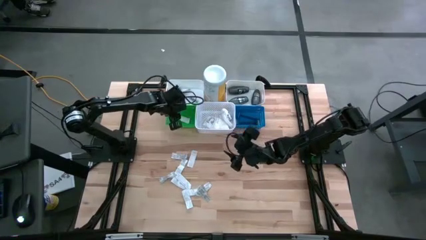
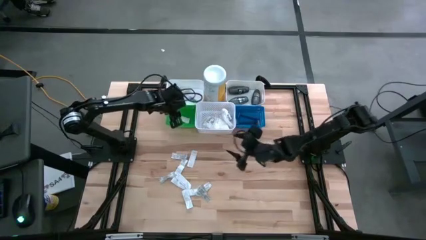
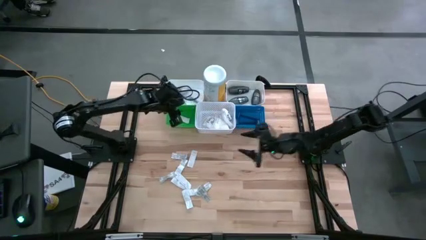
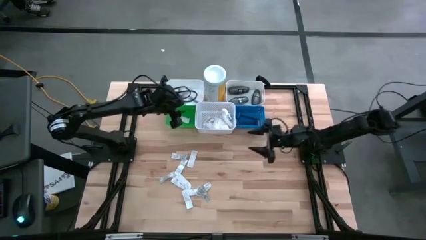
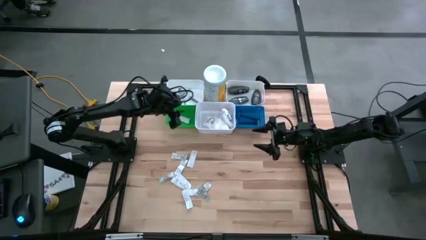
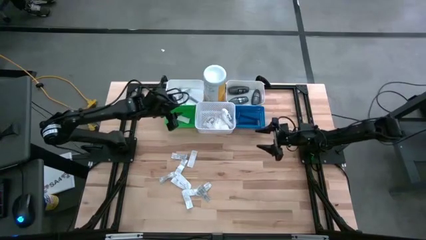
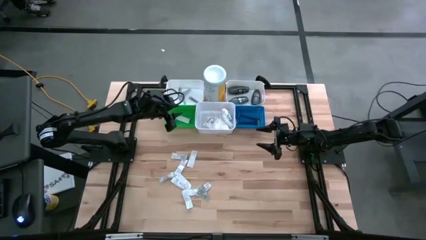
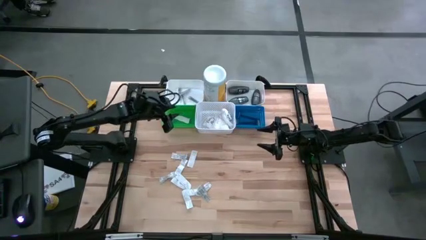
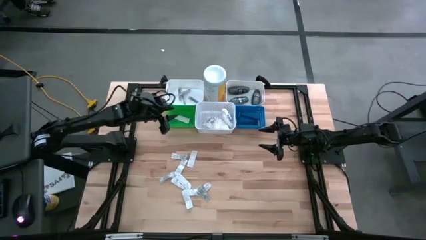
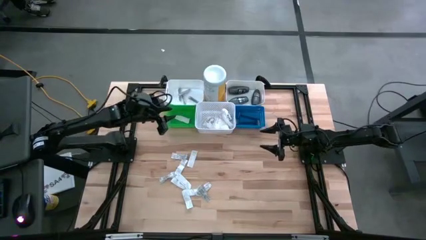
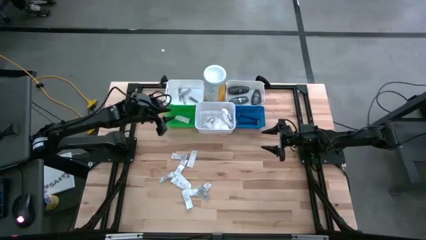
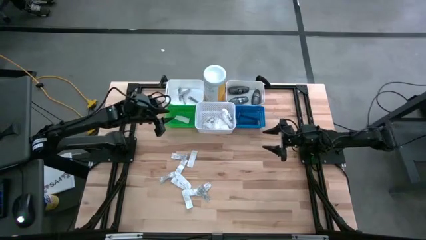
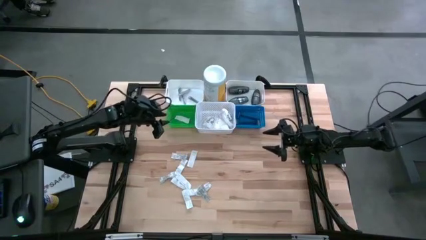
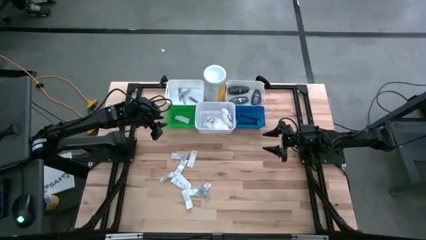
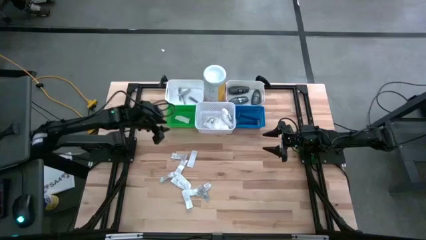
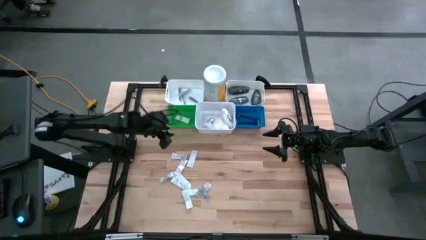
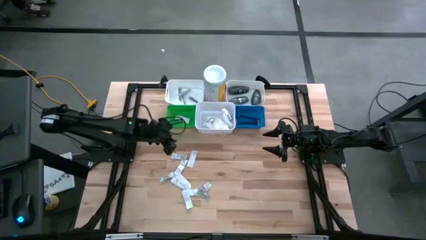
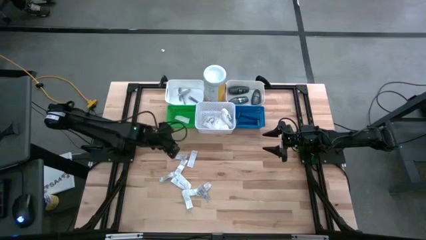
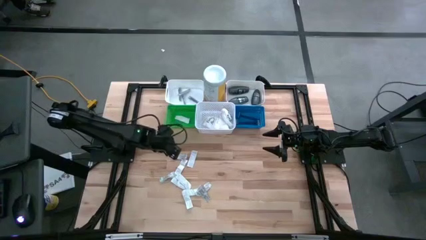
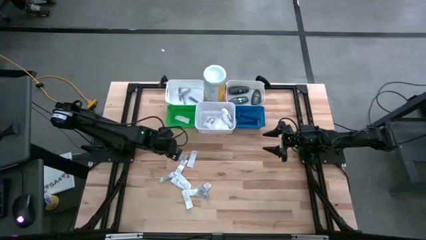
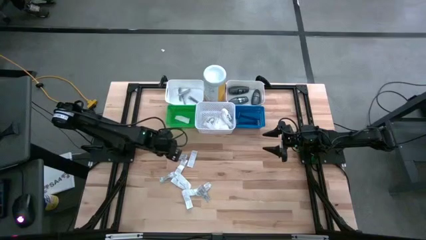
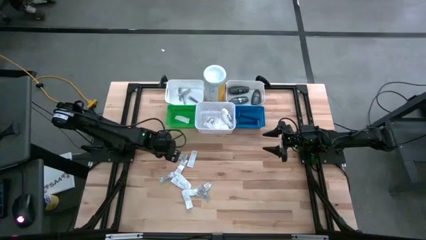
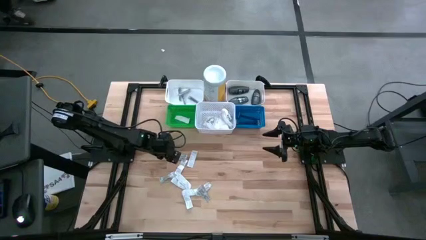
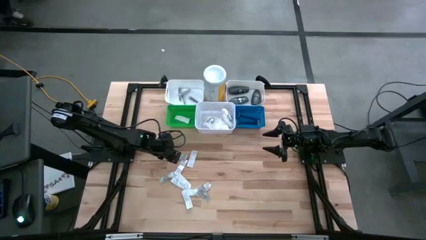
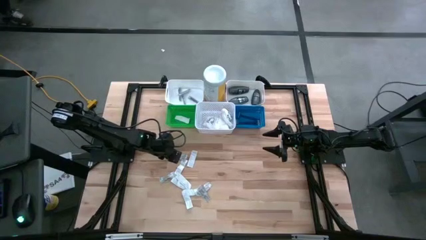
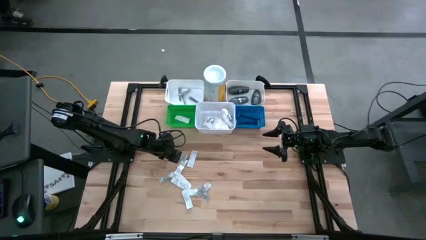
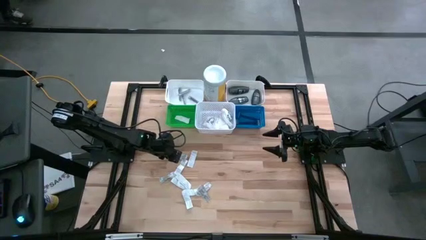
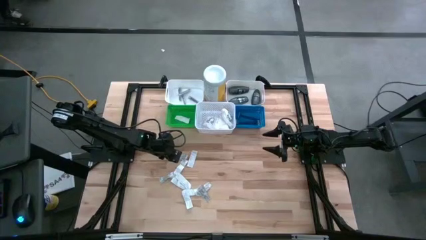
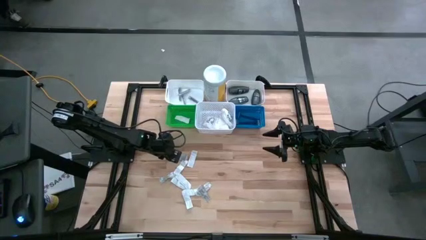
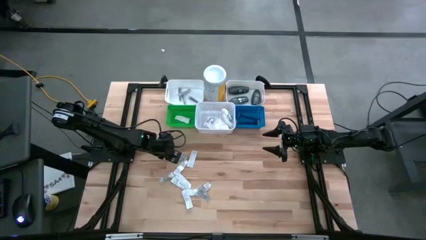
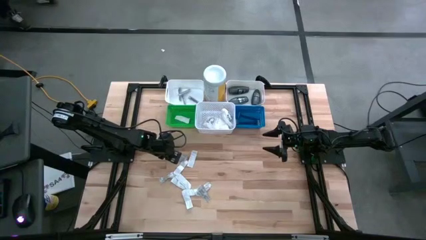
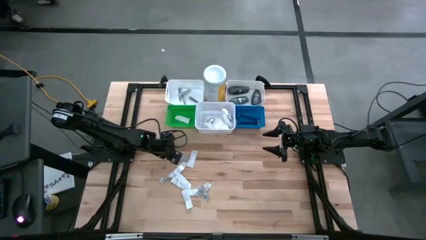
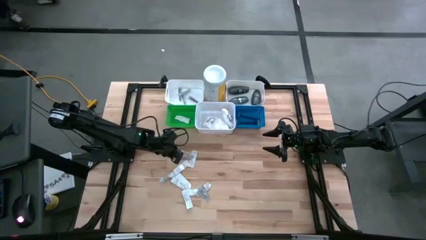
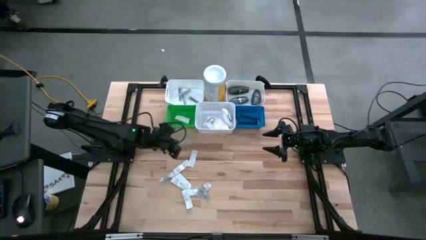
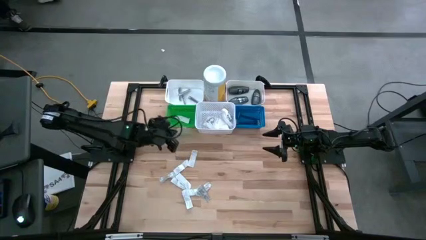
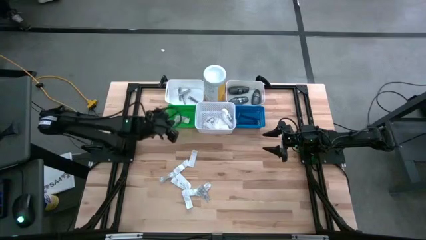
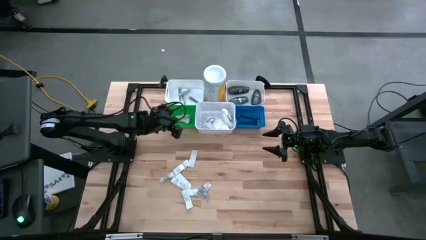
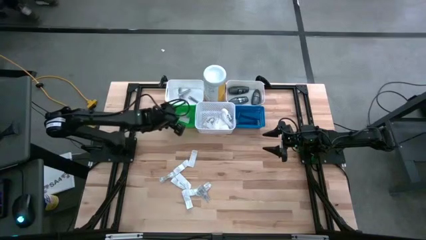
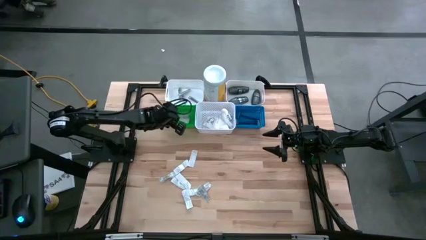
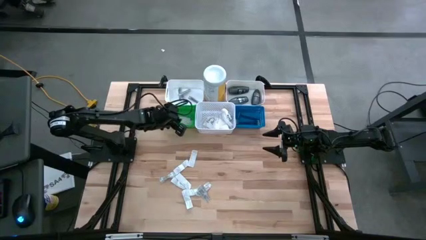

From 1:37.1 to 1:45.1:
Task: Pick & Place Travel size toiletries
Put the white bandage into the green bin

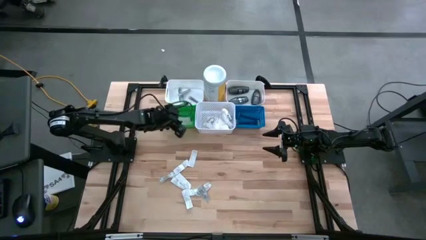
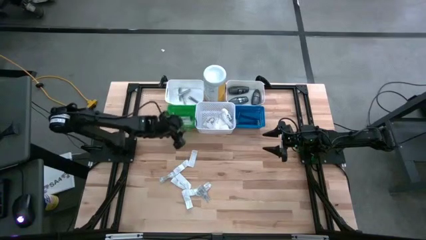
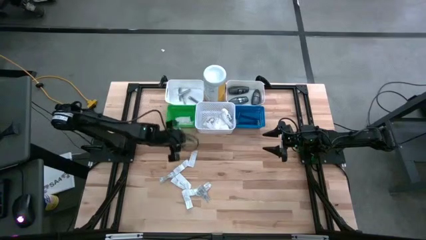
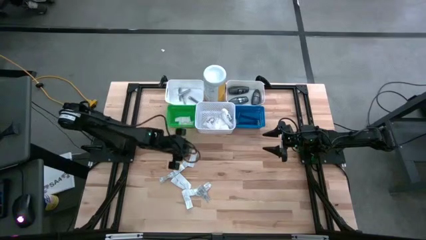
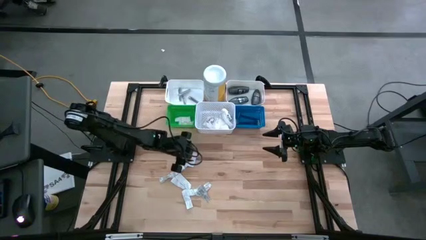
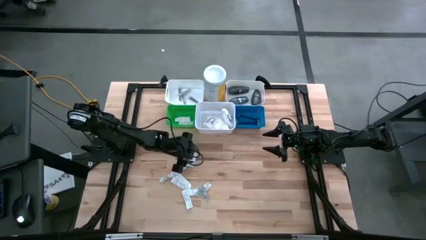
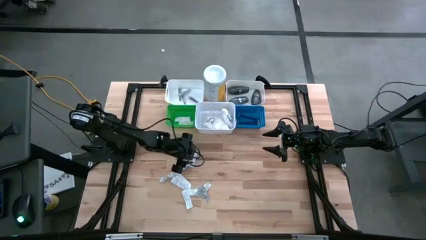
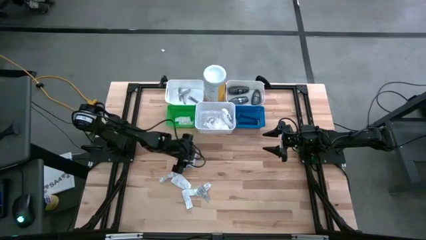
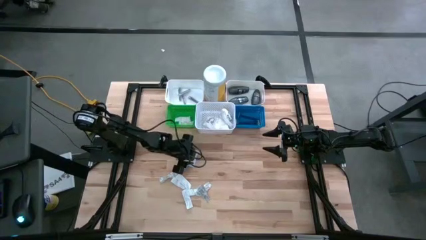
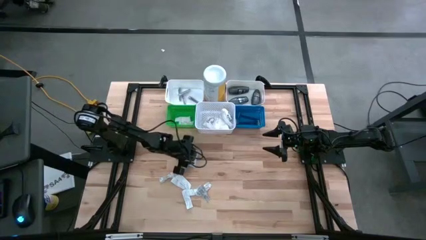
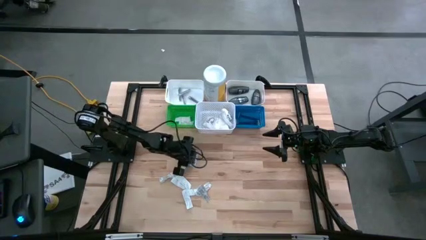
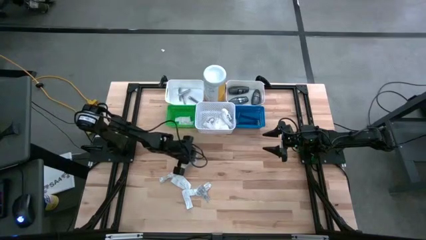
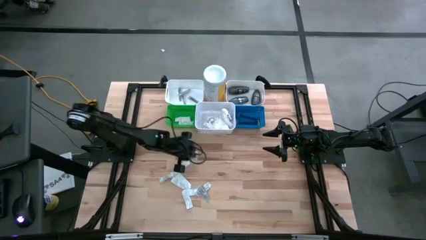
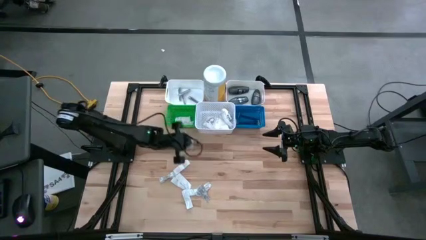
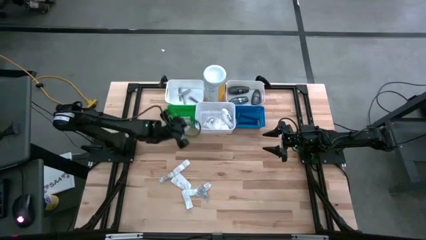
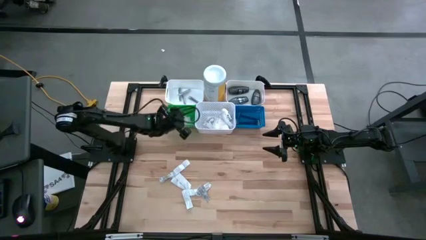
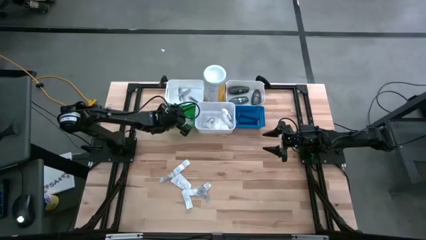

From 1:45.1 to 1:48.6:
Put the white bandage into the green bin

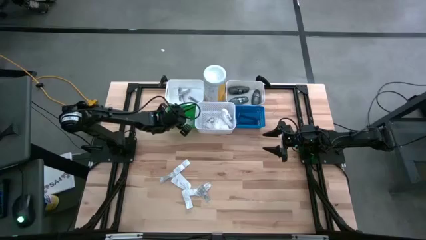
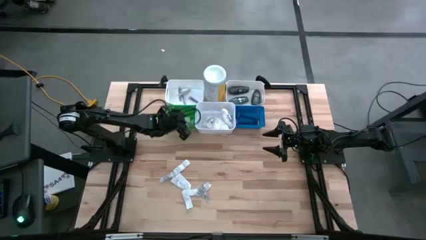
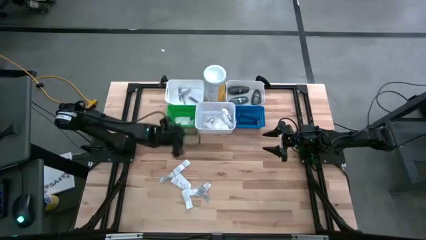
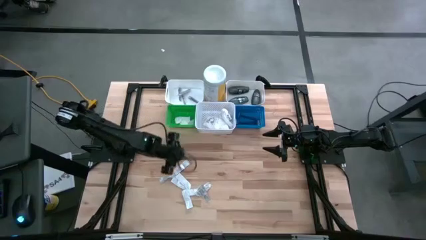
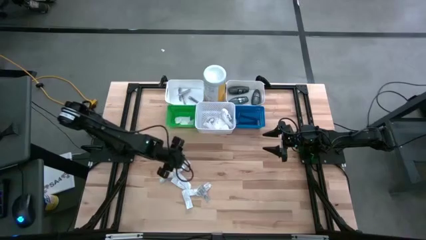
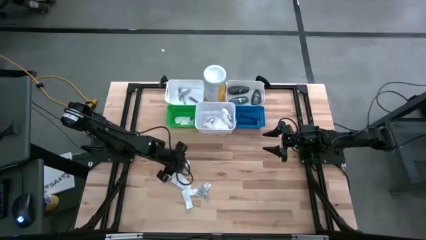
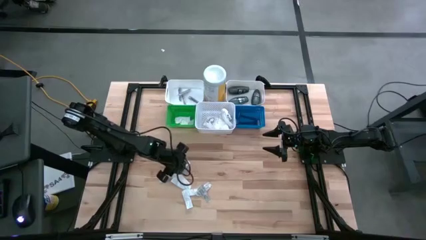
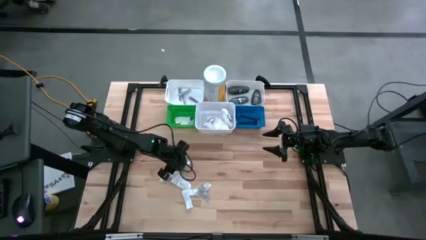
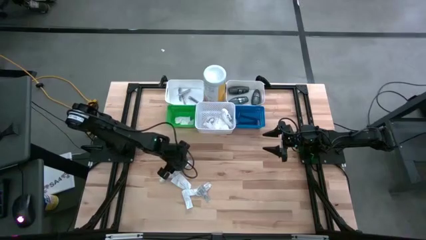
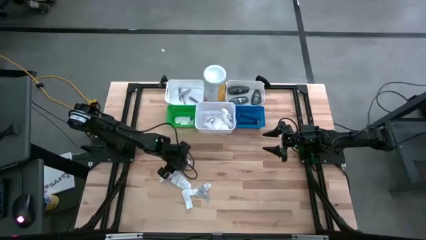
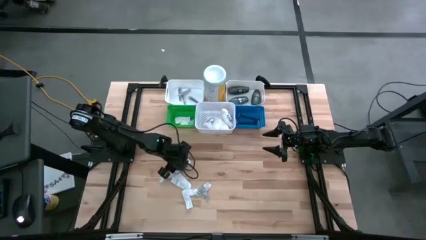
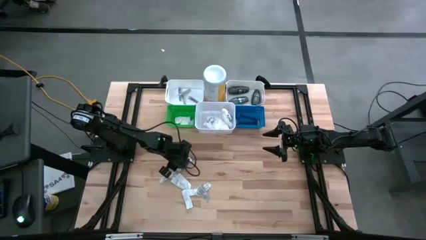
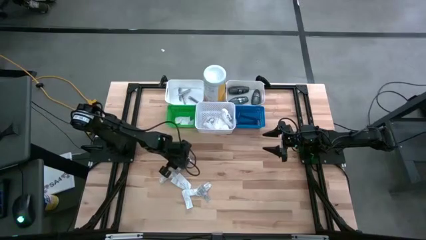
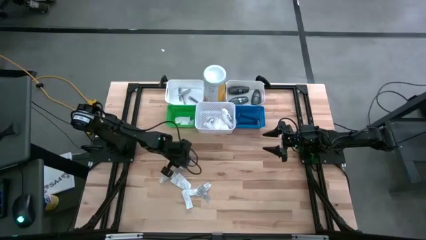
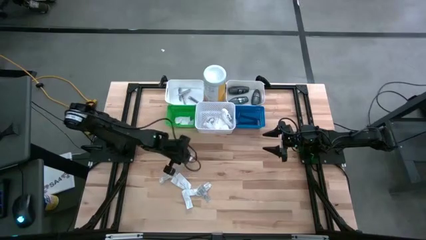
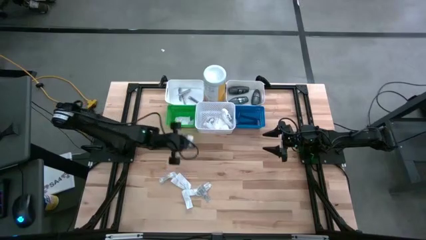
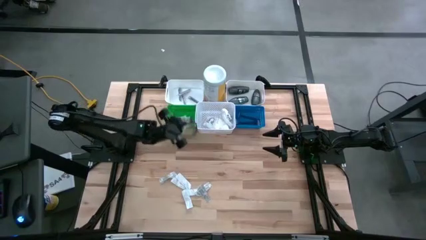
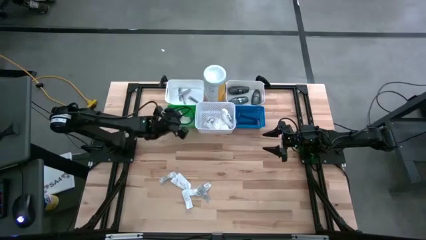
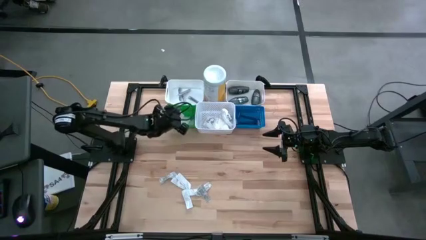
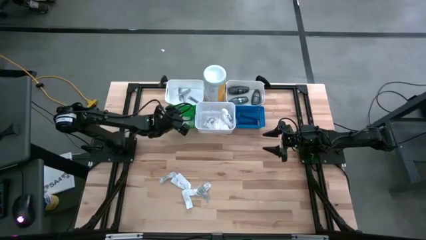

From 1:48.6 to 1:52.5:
Put the white bandage into the green bin
